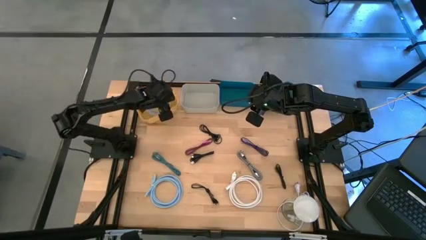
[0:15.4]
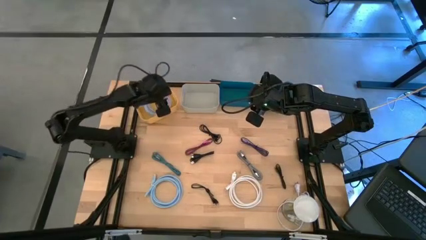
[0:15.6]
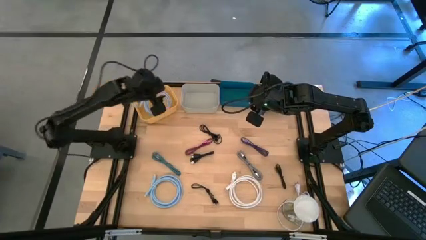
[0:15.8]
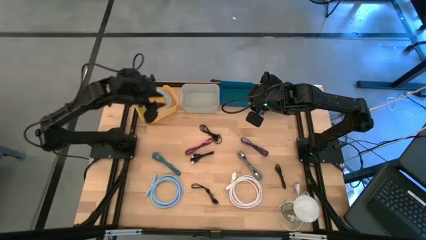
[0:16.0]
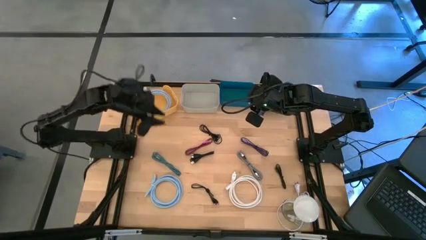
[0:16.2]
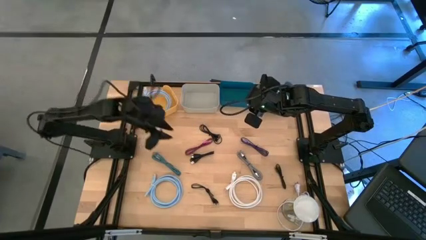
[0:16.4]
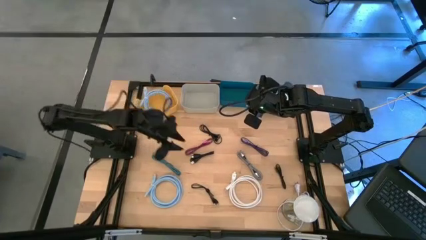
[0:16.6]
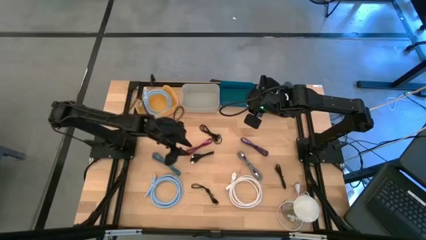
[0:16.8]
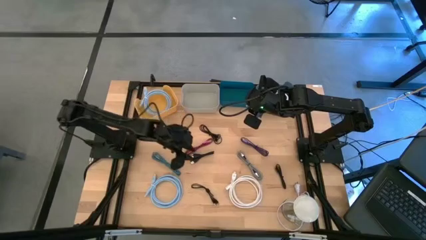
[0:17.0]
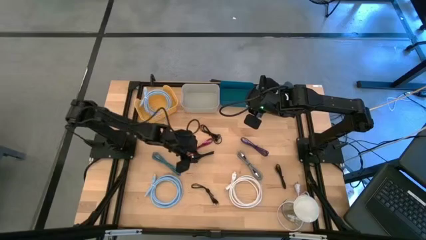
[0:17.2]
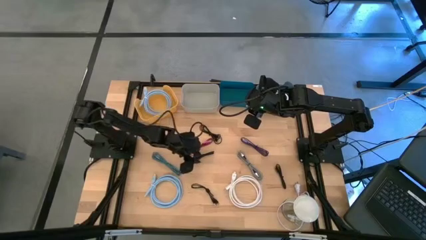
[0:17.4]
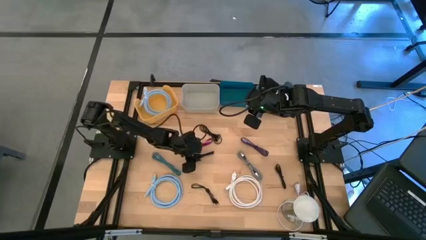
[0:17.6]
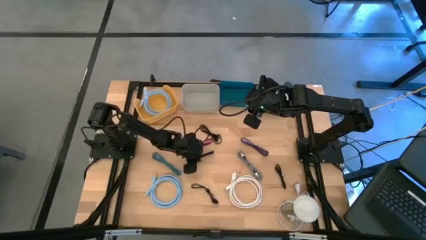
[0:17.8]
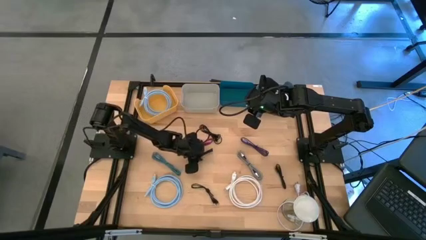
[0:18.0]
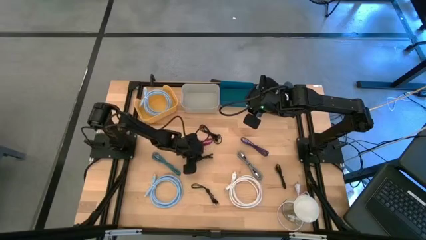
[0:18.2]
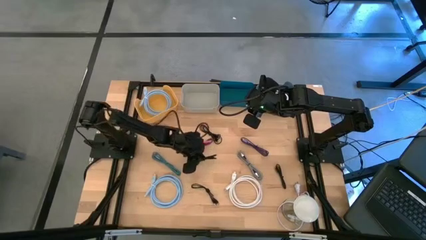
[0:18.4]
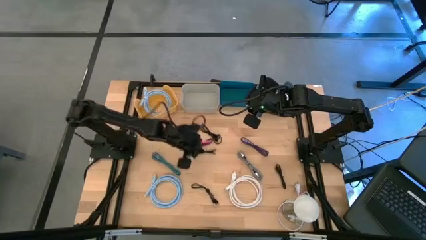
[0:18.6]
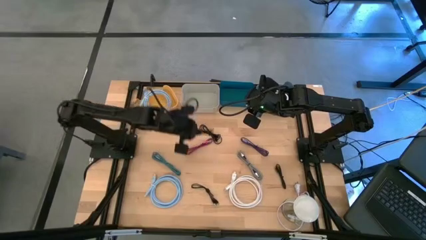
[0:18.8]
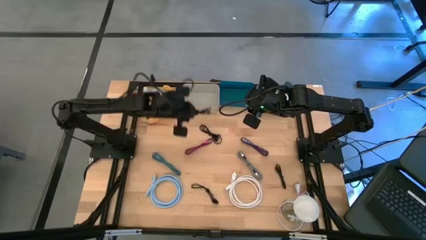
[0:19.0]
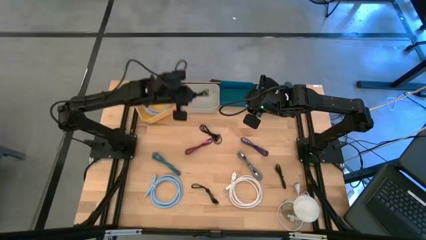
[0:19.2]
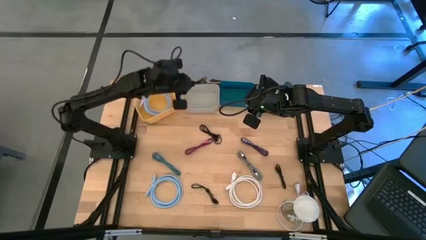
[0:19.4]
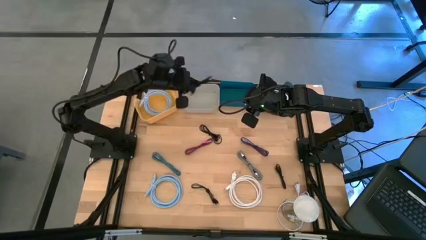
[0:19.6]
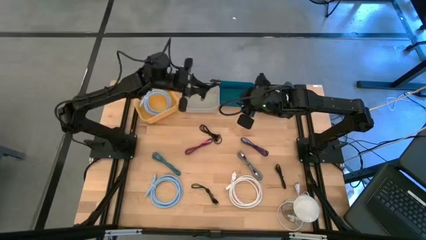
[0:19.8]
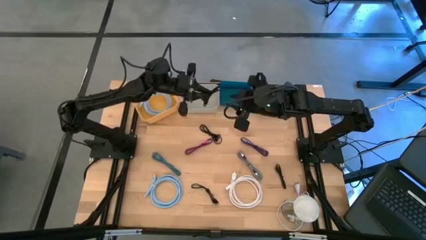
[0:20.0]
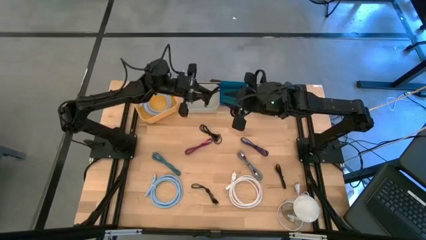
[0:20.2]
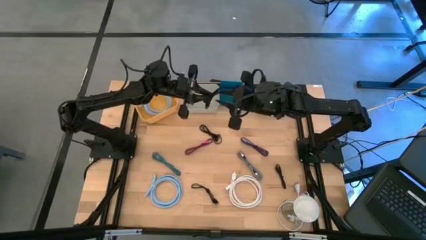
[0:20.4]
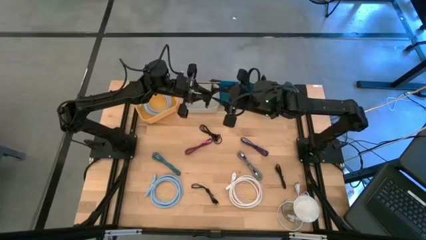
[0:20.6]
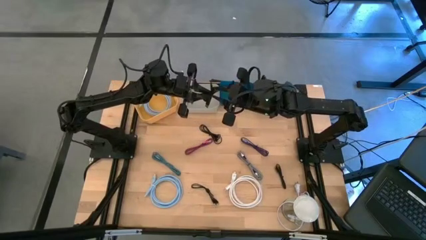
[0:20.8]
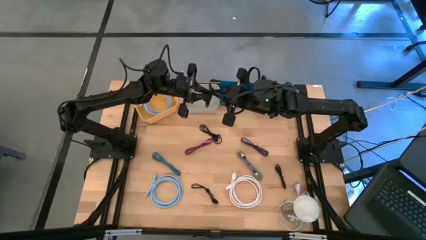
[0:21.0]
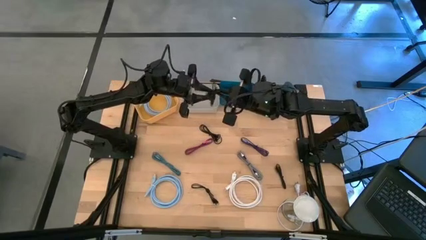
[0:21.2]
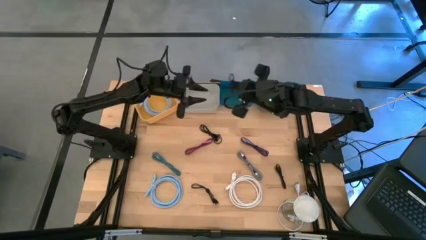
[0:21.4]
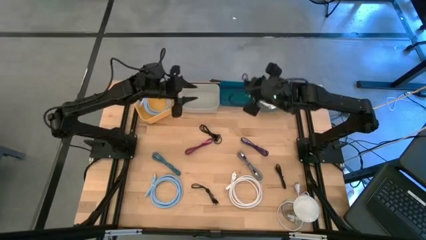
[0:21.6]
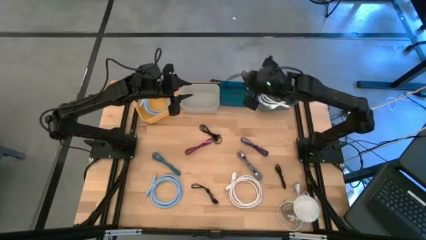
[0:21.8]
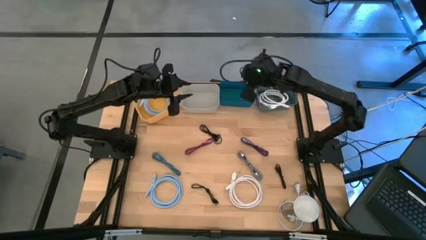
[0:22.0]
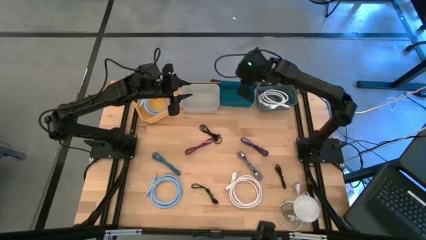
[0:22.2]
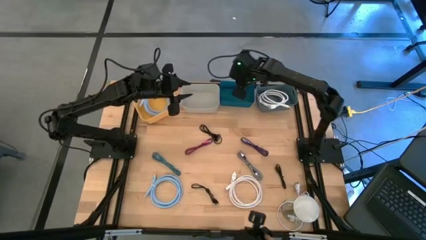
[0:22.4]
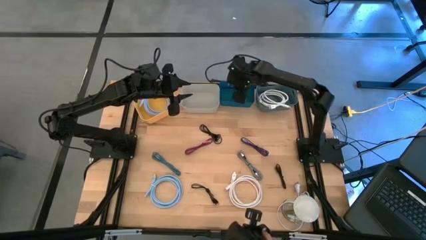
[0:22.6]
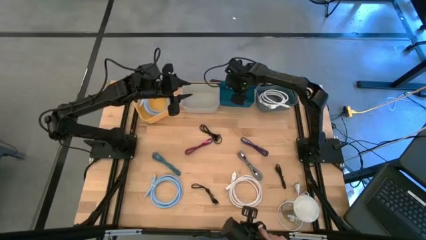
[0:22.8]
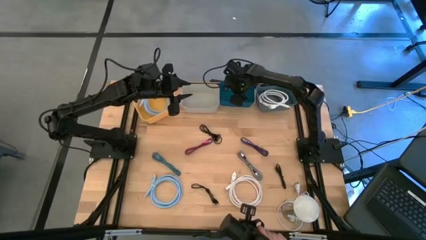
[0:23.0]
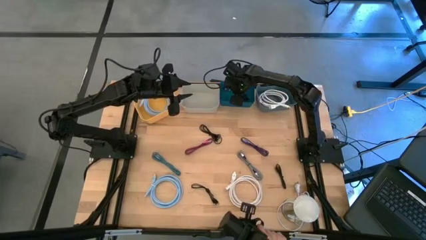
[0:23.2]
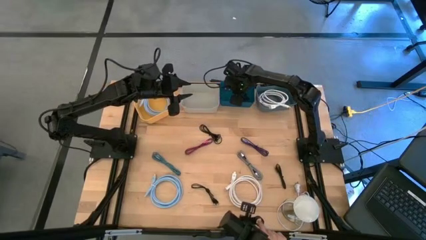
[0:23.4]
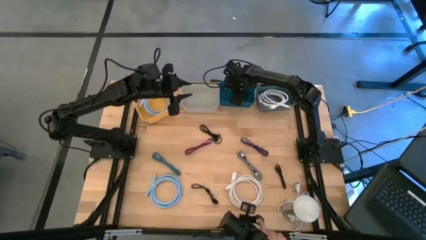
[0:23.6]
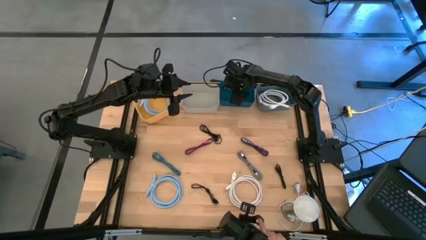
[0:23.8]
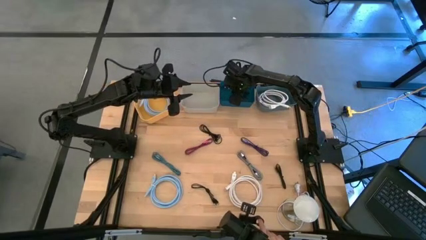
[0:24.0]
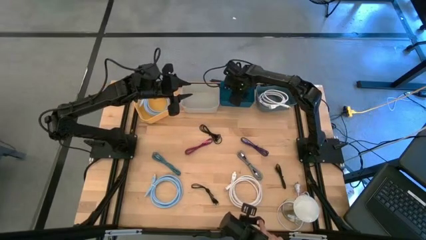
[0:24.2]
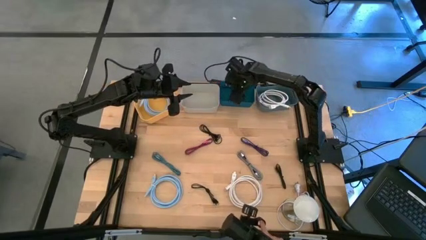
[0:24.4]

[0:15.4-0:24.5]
Task: Pick & Place USB Port
Put the black charger cable into the dark blue bin

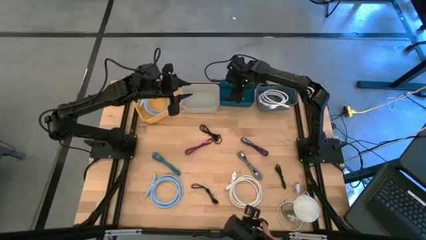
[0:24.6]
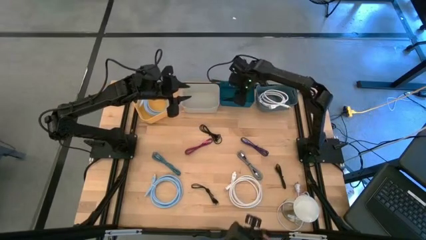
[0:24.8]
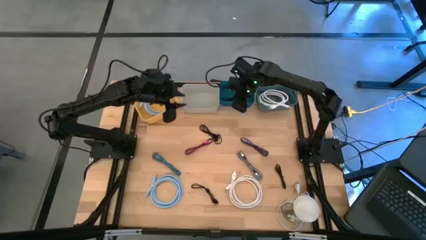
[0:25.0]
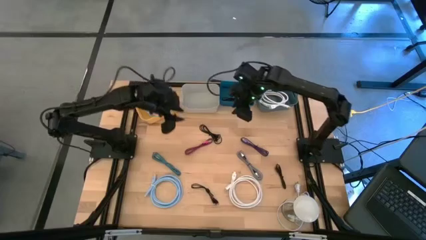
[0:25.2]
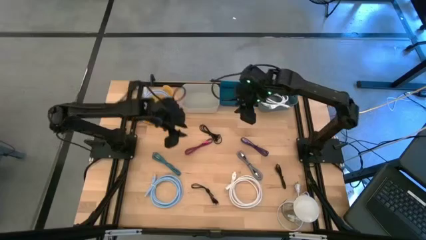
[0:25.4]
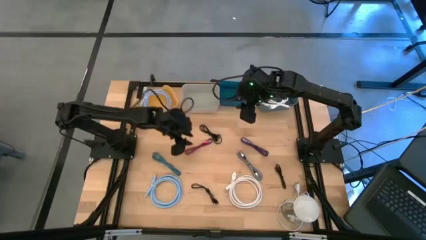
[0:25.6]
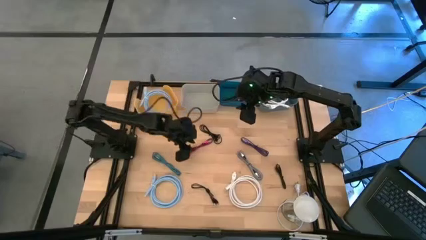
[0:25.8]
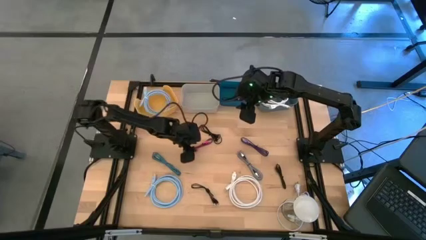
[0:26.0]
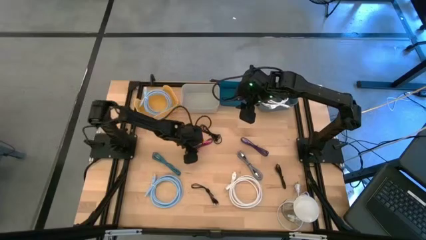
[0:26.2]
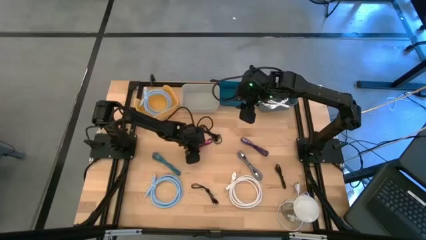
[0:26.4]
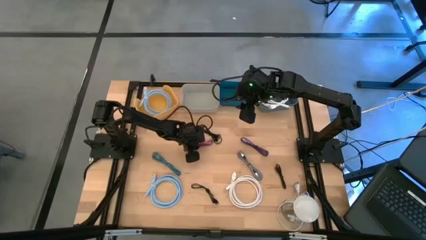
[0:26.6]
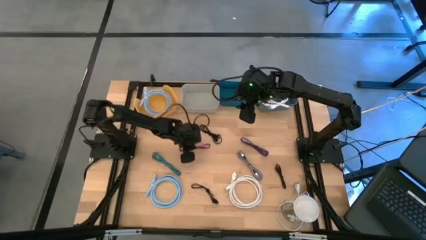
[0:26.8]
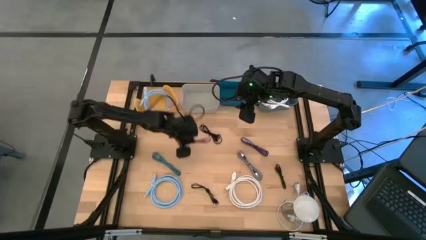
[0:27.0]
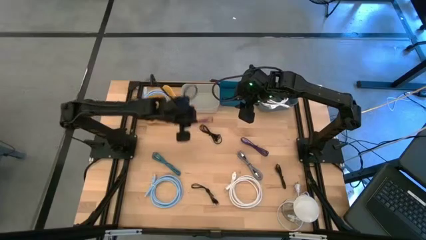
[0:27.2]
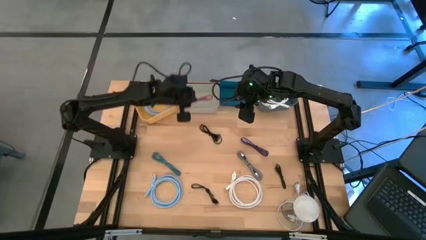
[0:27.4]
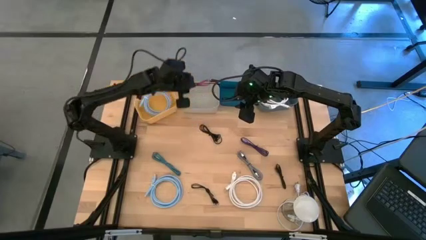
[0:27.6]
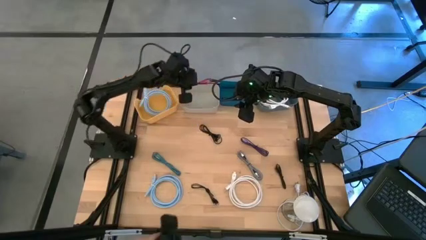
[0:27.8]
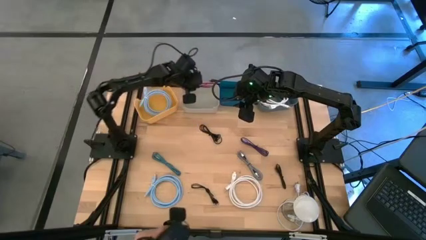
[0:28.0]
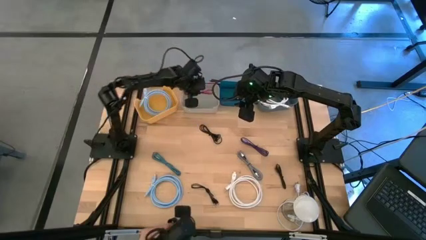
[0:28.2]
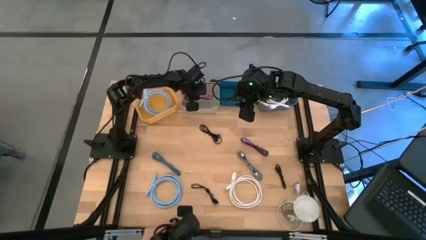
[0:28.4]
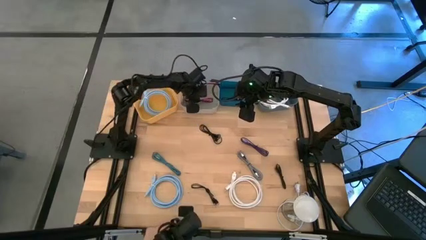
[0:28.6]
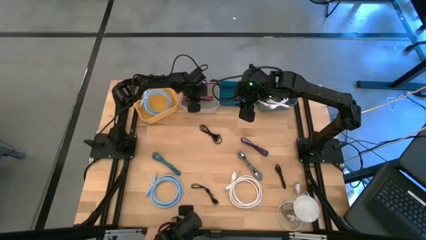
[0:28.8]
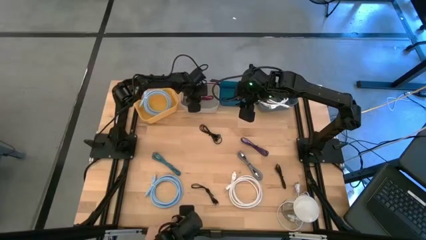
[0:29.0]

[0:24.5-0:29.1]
Put the red charger cable into the gray bin

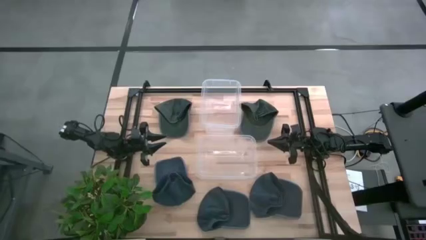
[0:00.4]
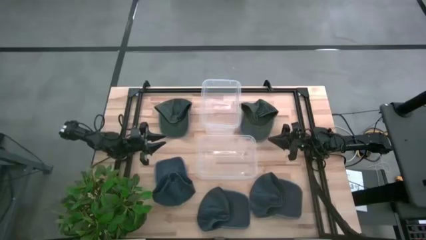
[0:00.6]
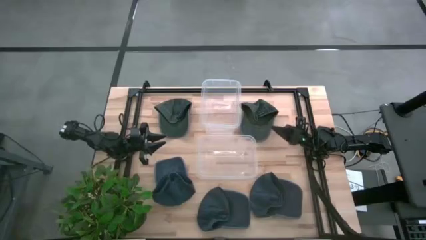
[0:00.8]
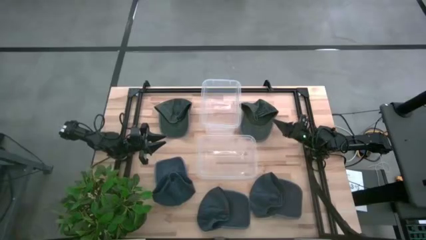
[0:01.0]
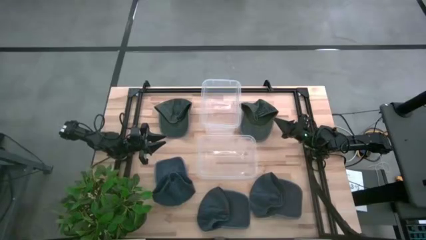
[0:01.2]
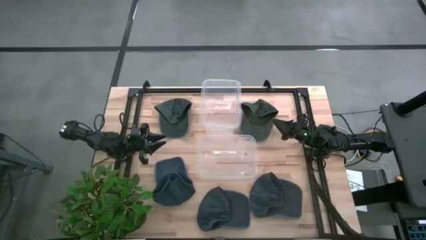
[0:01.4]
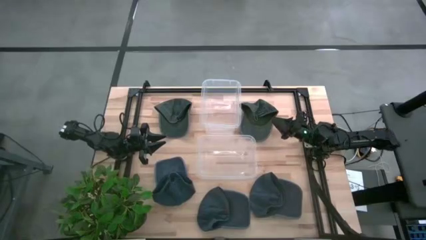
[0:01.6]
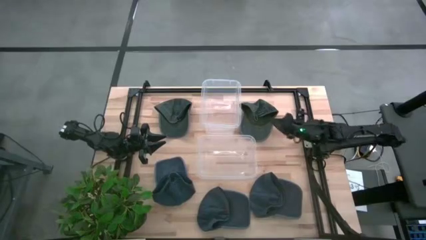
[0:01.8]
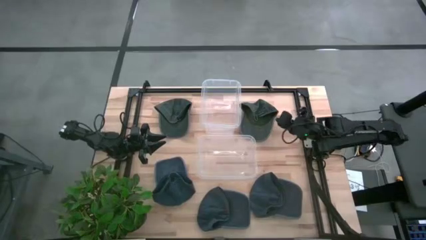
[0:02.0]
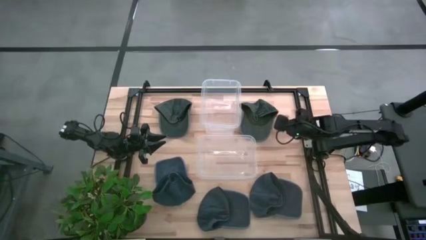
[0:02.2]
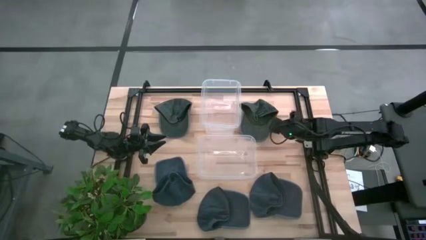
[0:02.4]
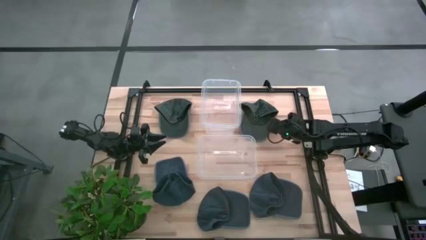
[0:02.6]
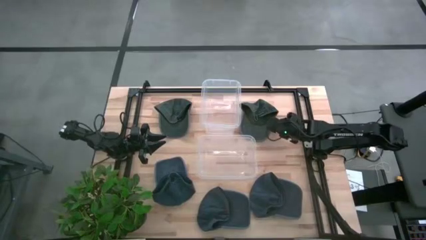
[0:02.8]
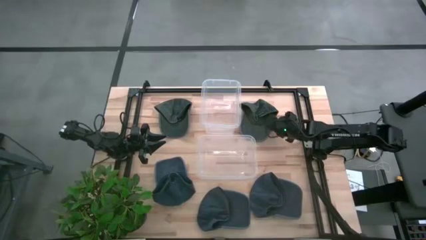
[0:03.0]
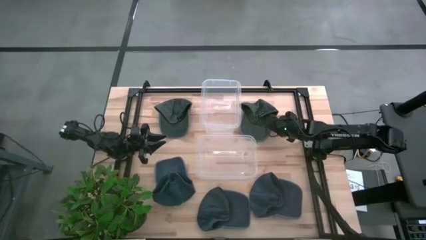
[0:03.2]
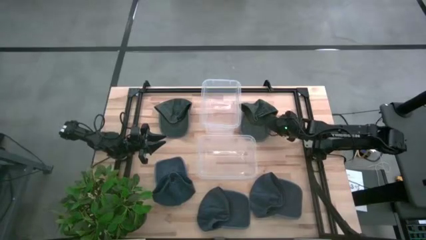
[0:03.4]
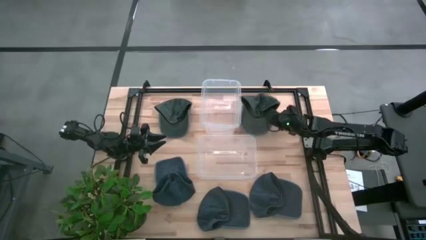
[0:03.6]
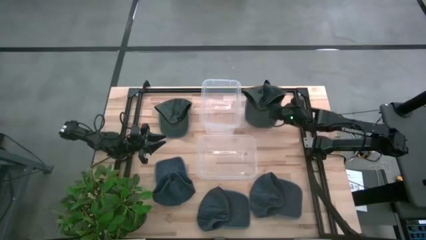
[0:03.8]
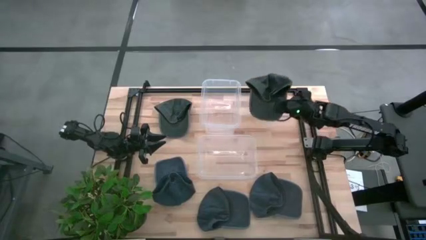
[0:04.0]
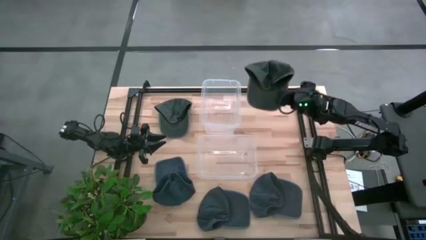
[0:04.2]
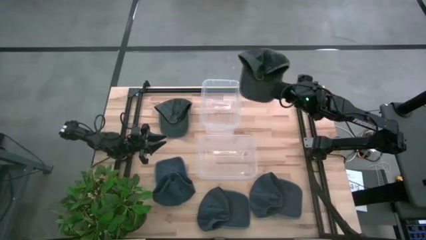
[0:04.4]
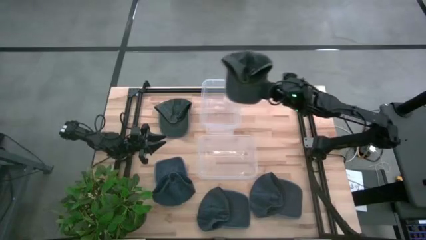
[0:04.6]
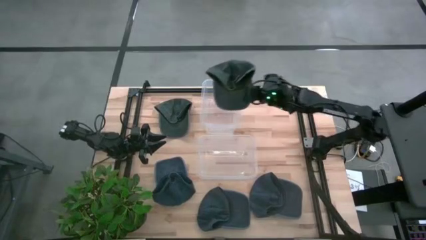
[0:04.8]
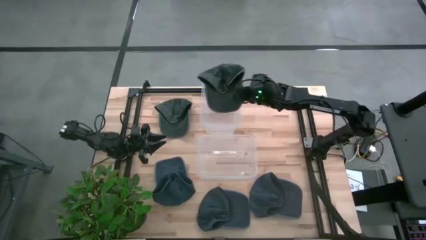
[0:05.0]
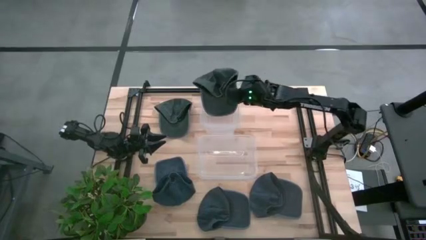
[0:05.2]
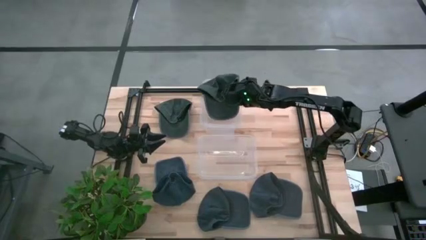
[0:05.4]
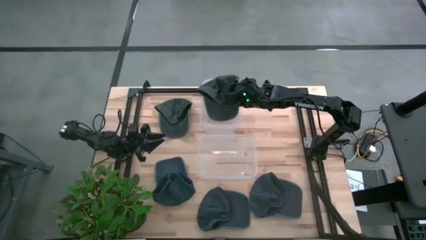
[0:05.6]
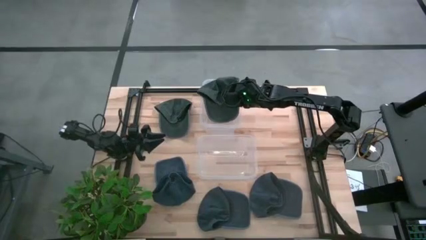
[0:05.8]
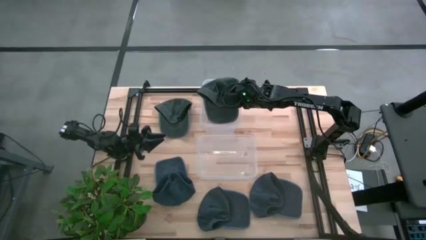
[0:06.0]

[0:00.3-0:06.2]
Task: Pick & Place hat
Put the right gray cap into the top transparent bin
